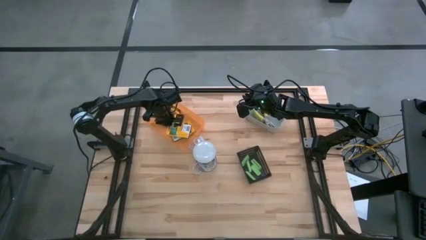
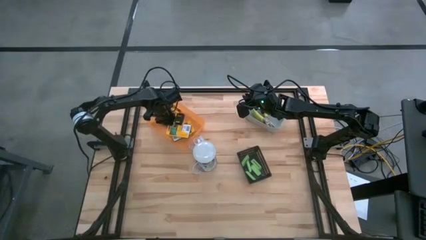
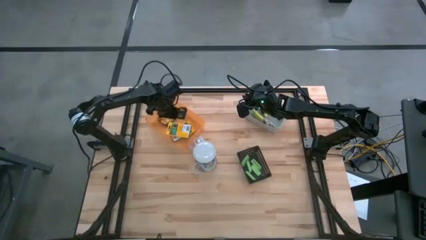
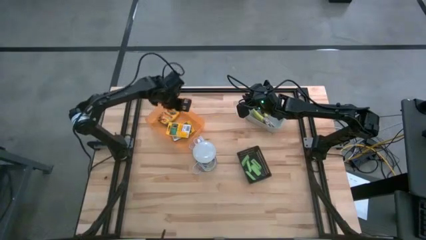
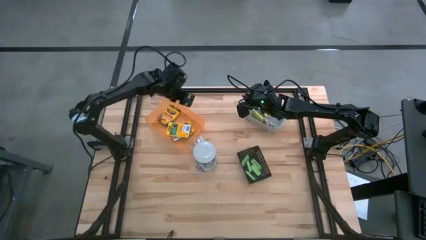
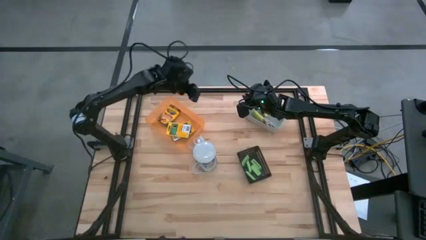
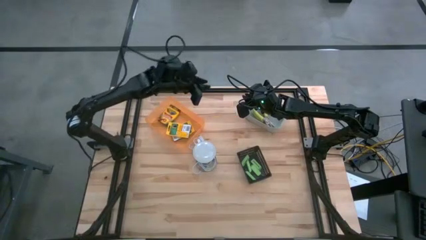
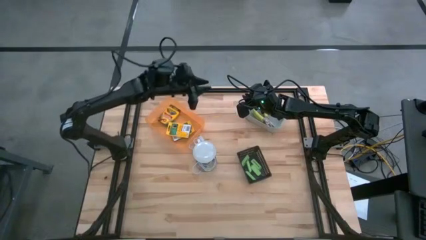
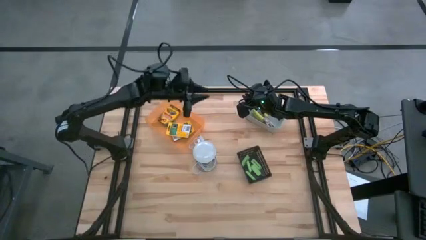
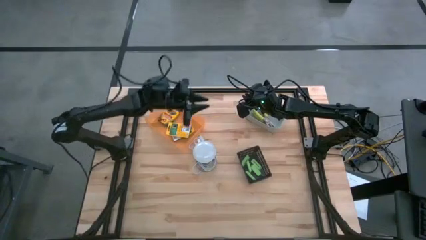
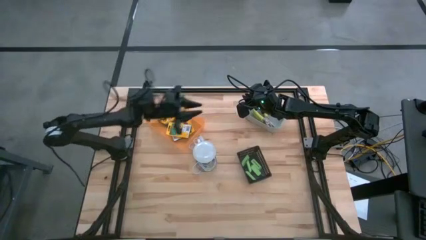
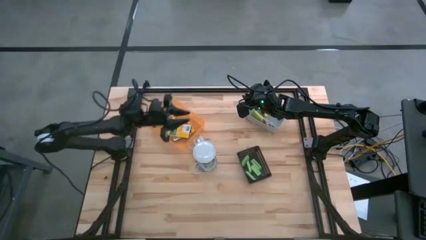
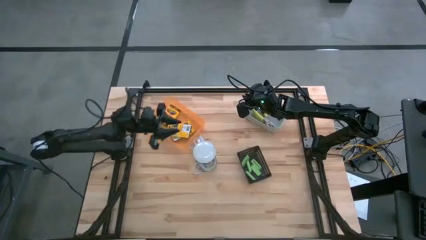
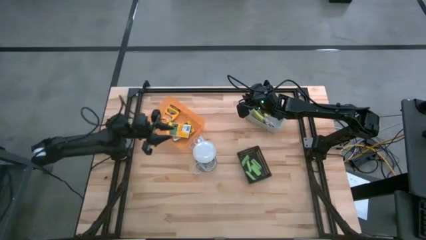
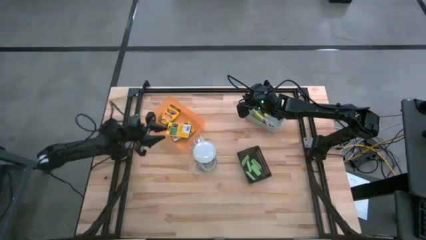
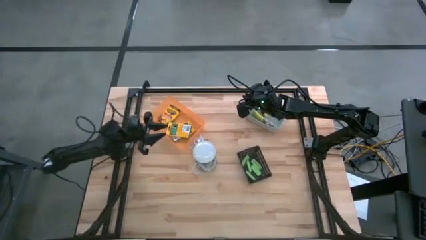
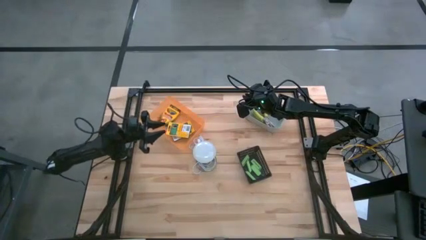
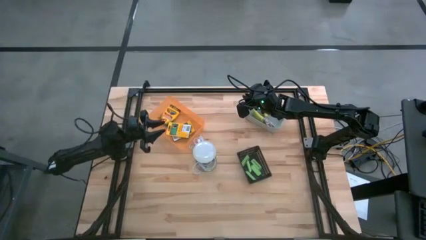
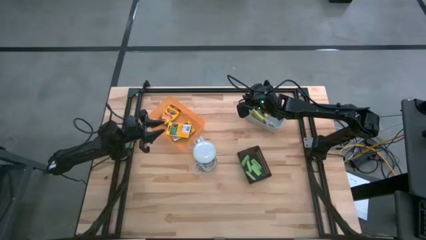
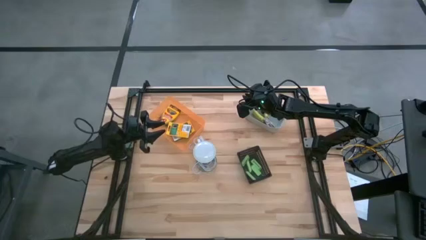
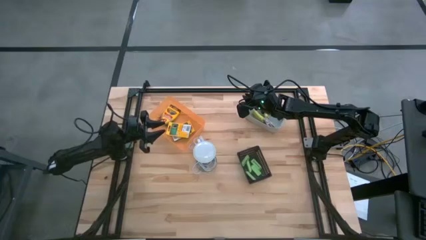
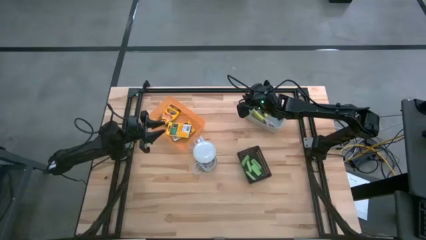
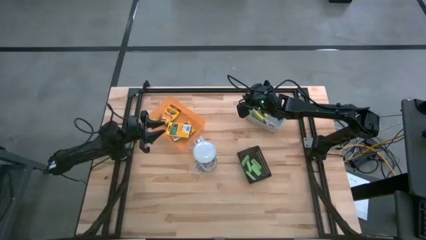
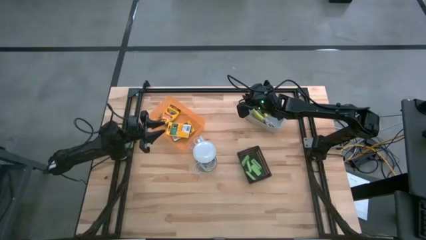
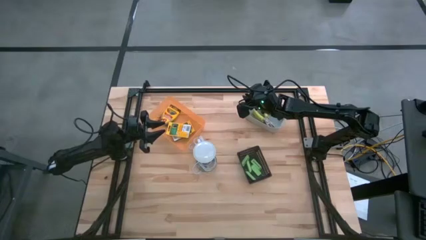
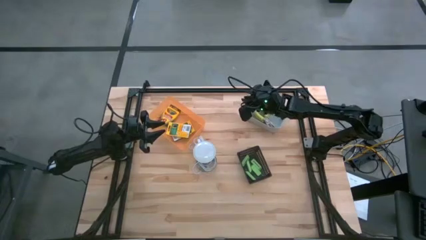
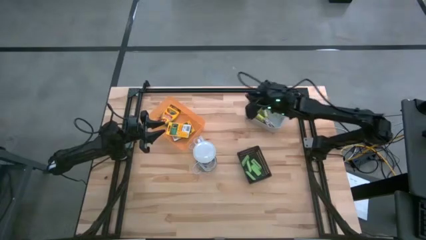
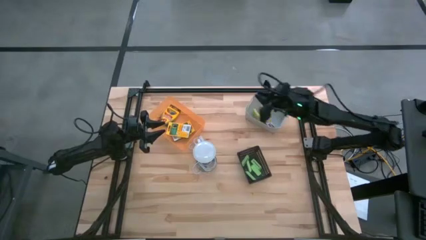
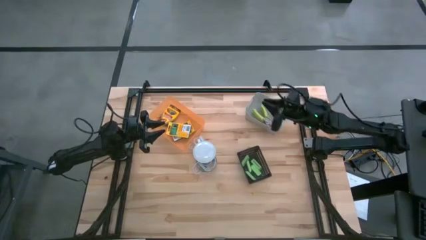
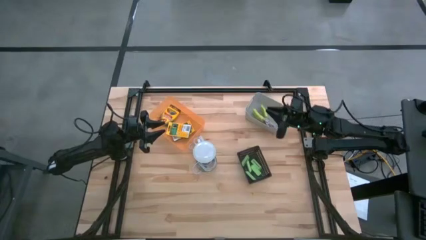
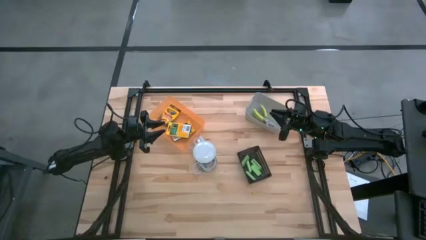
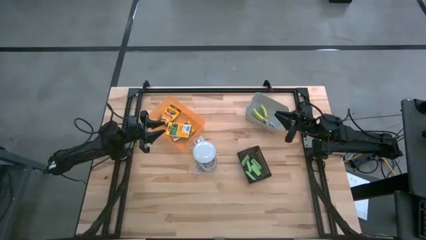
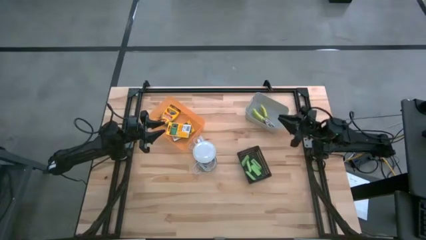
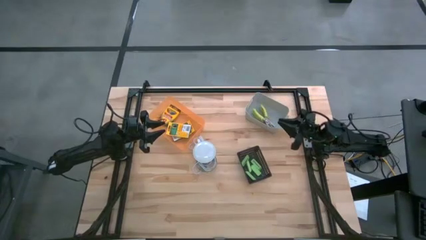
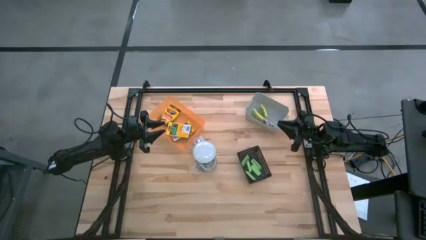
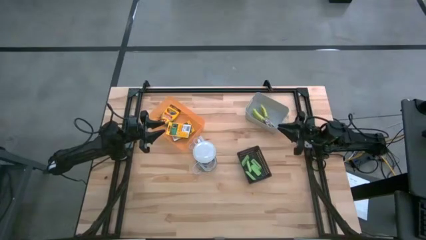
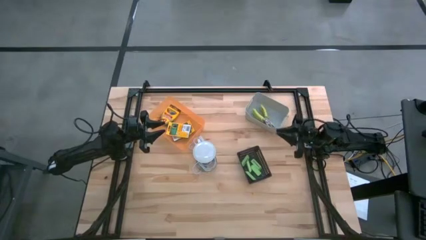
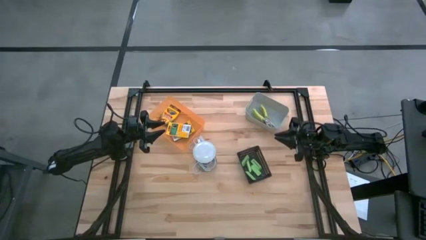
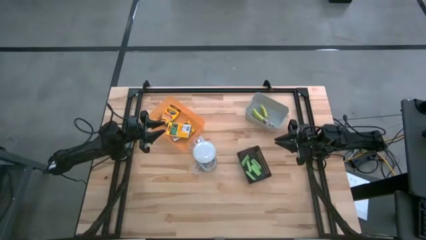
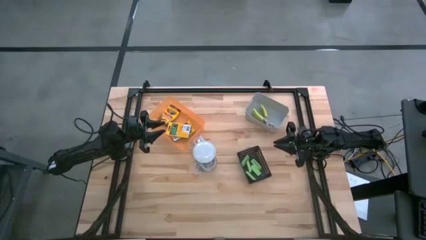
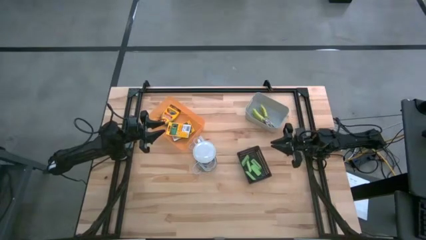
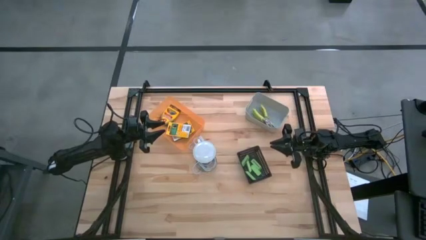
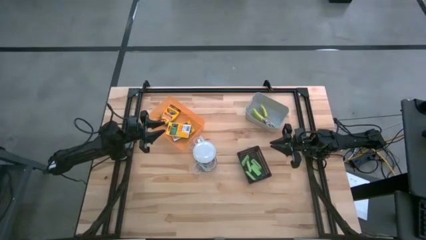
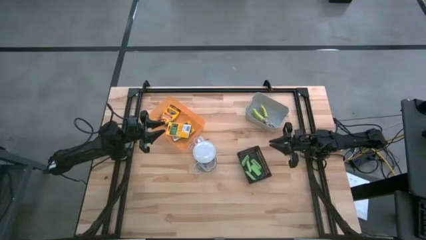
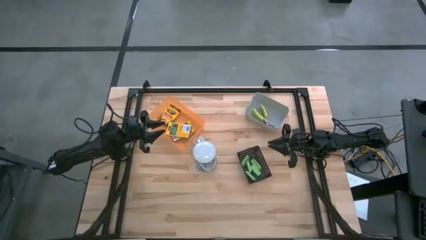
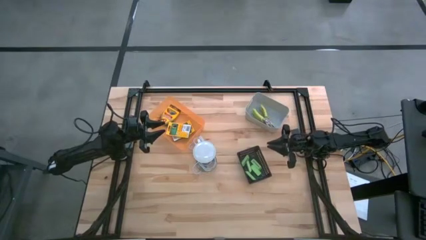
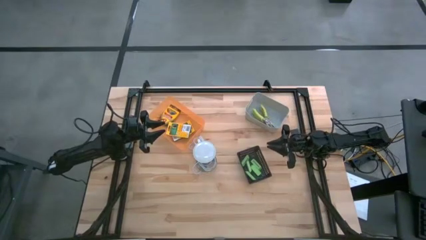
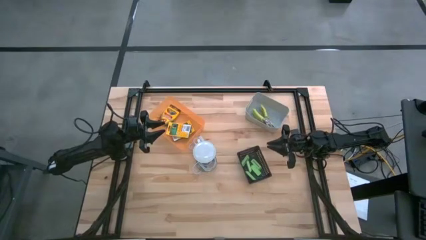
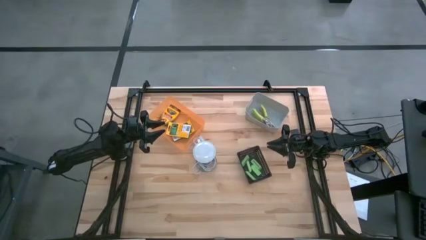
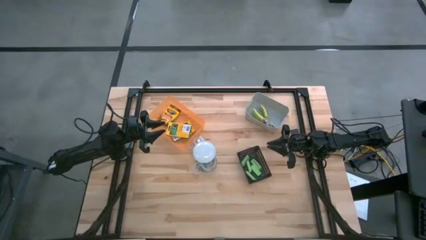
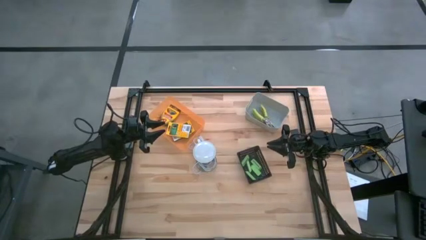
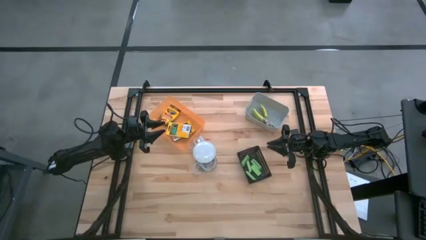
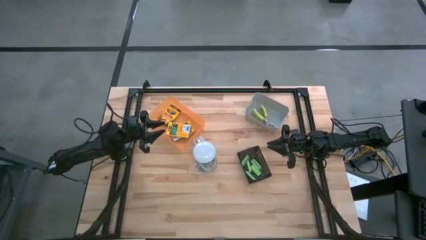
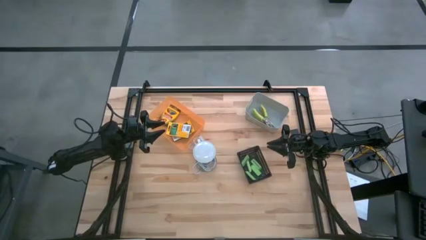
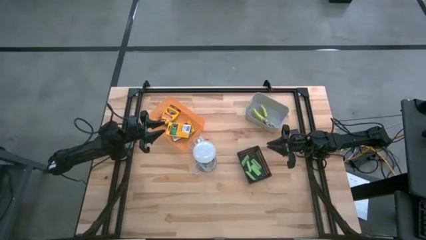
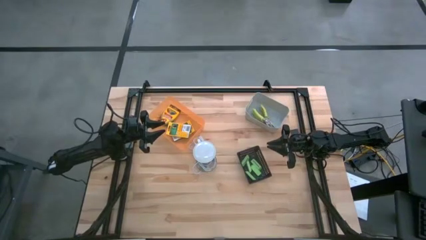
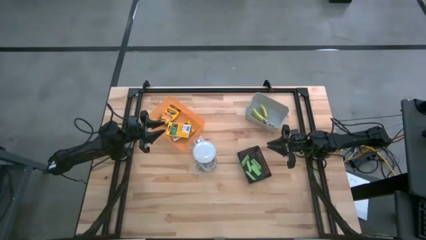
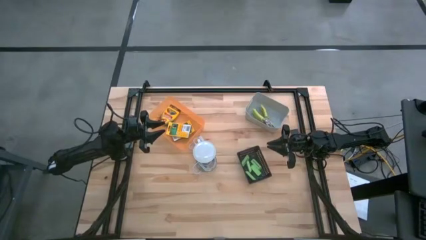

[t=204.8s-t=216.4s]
Task: Pick & Place School Supplies
Return to Home Position

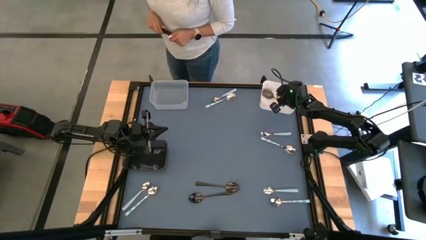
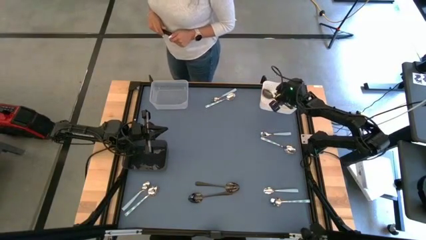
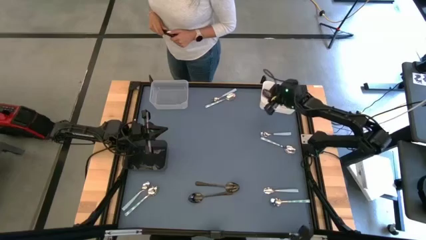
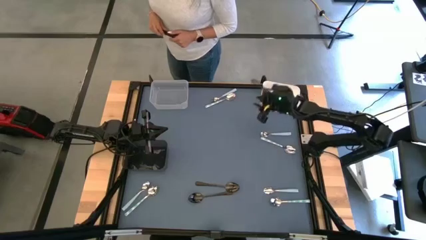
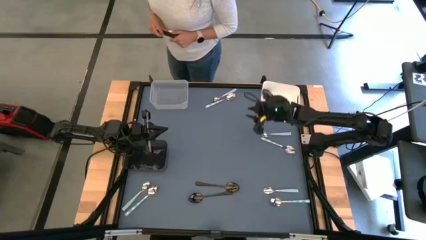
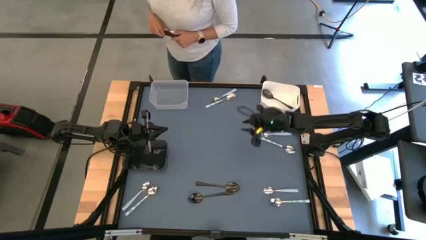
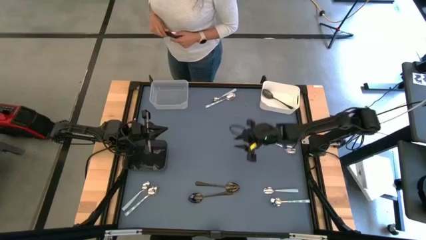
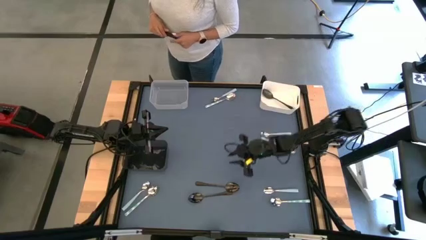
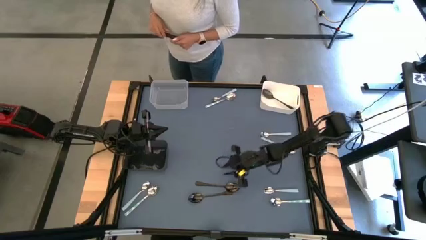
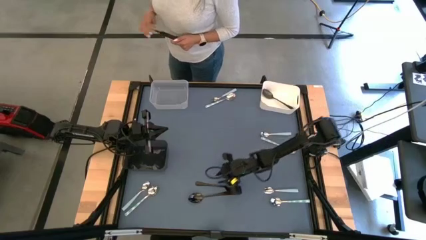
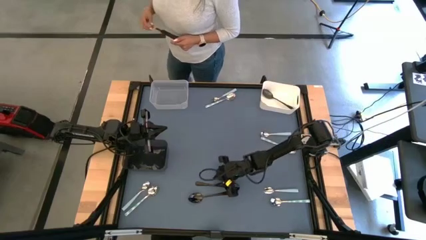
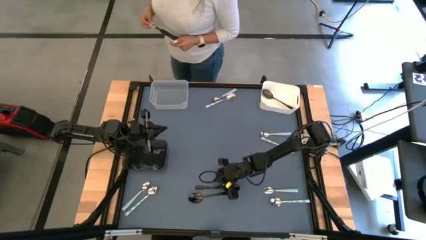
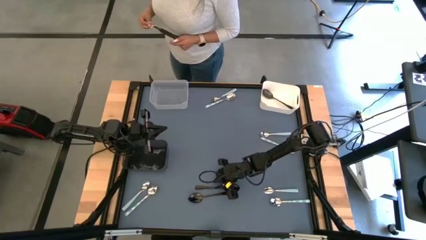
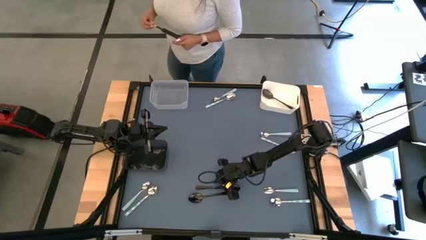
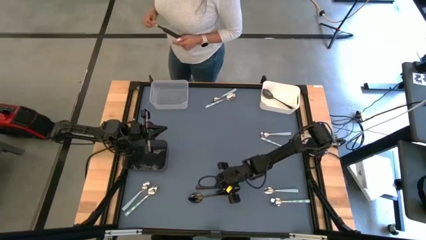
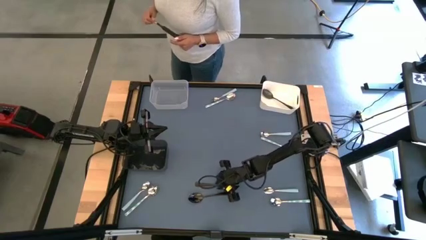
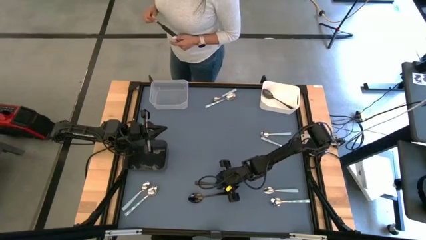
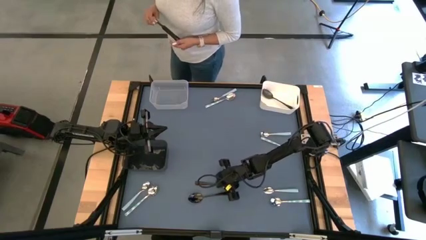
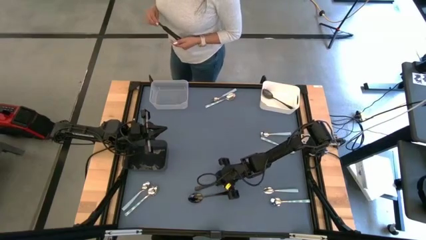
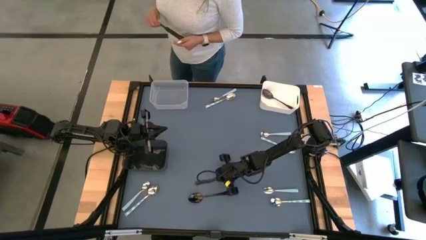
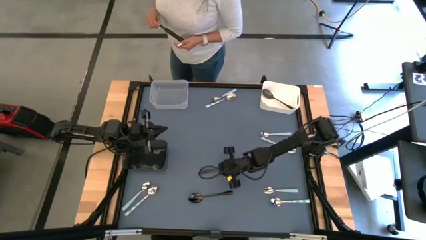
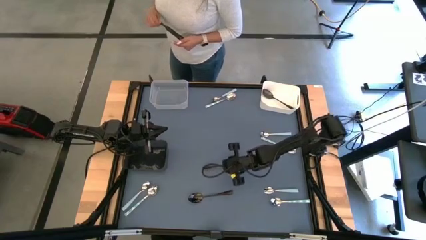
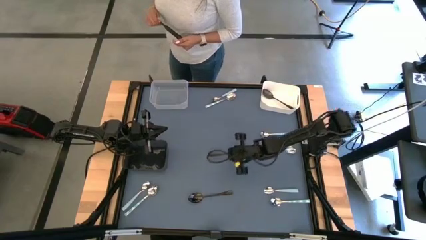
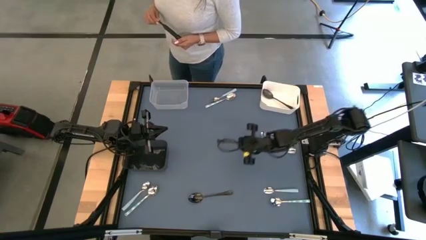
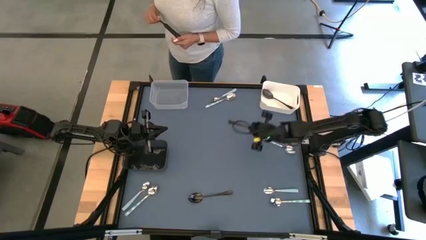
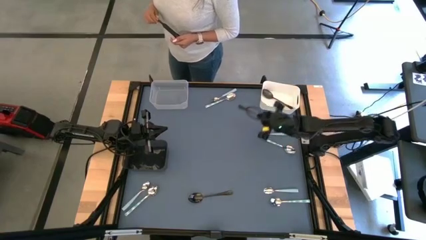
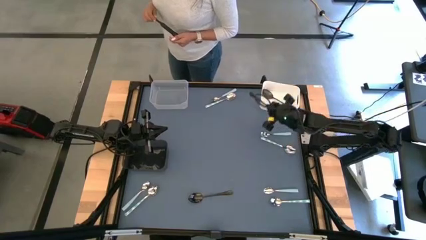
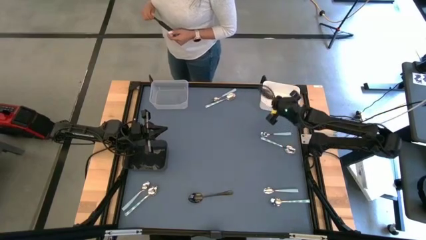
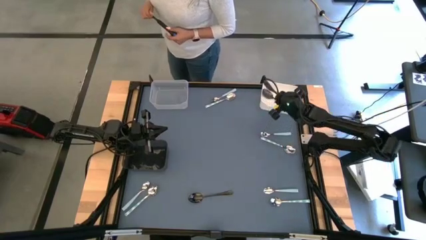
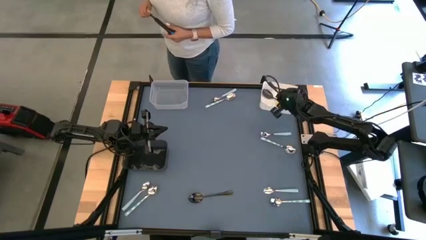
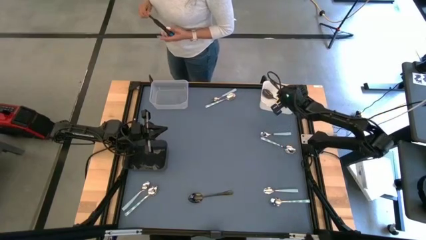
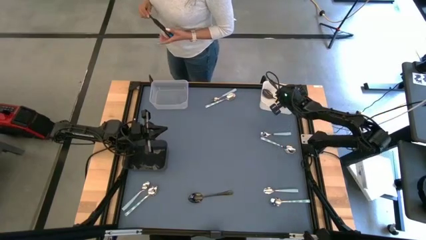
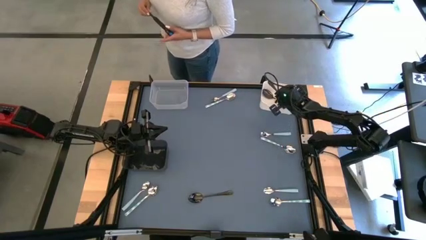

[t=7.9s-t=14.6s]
Task: Sort silverware by color (type)
Put the black spoon into the white bin
